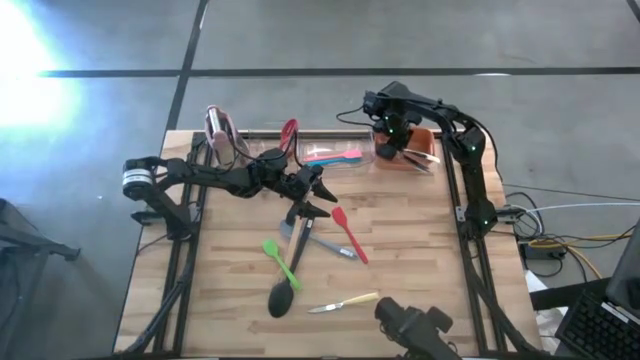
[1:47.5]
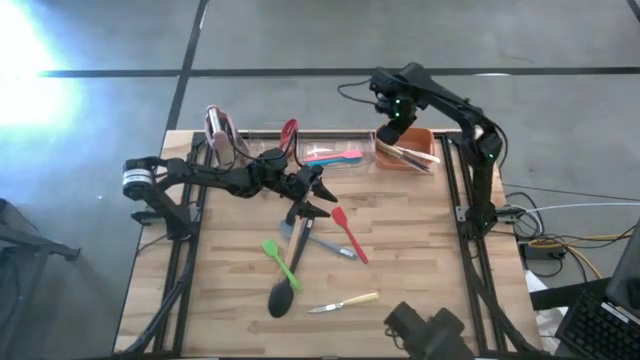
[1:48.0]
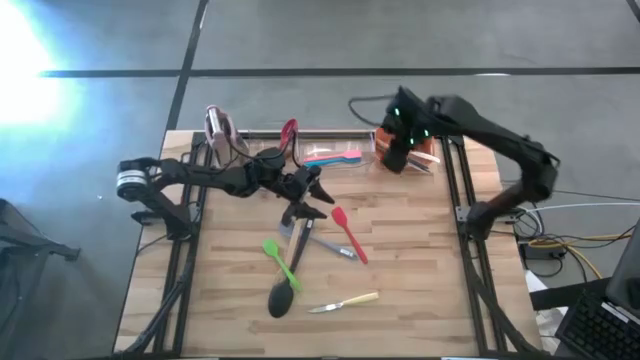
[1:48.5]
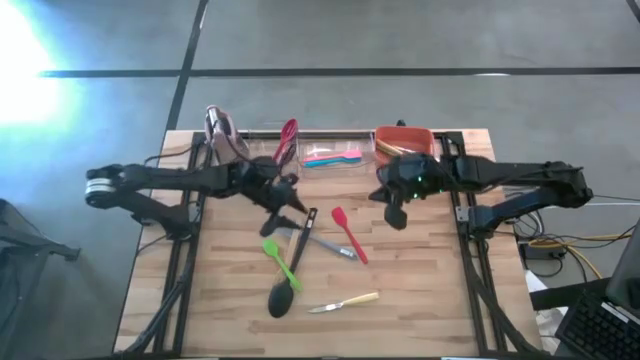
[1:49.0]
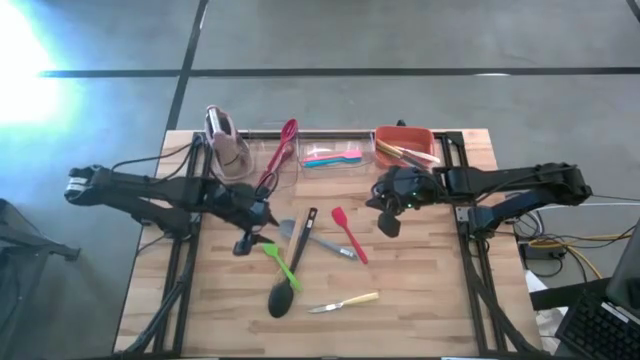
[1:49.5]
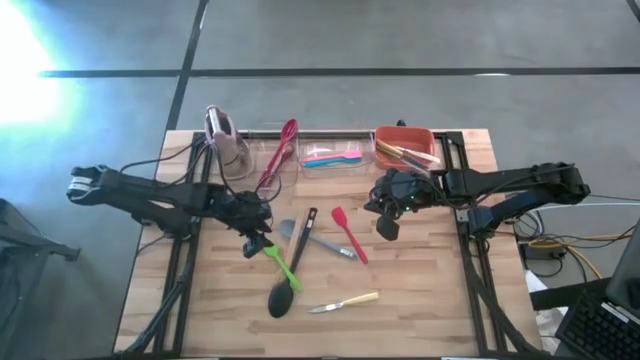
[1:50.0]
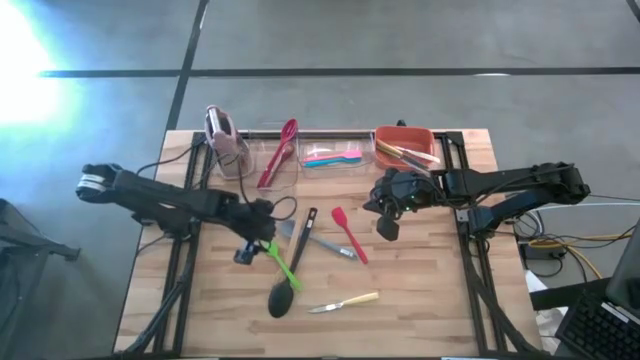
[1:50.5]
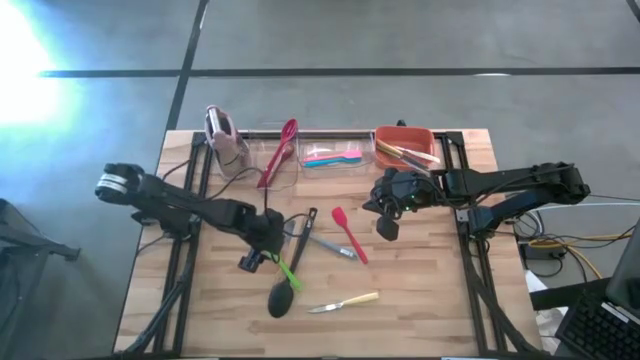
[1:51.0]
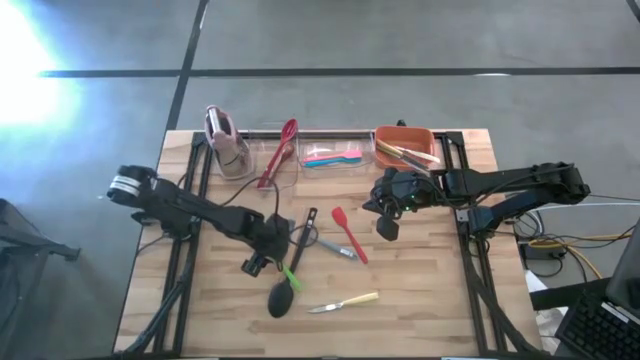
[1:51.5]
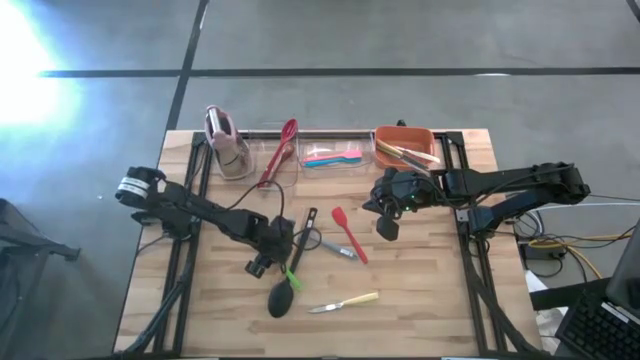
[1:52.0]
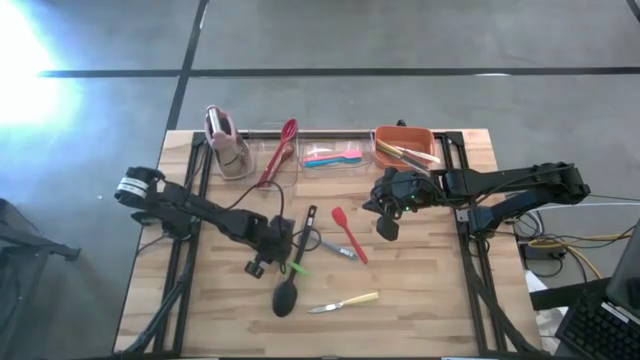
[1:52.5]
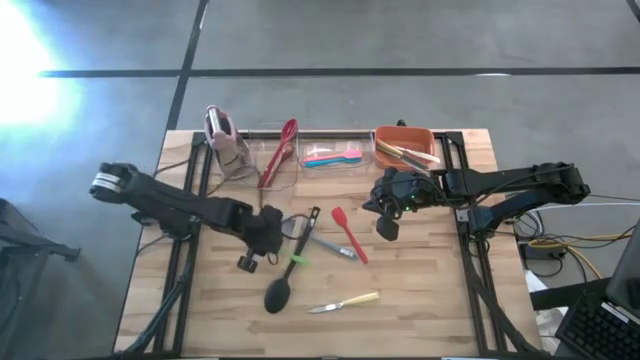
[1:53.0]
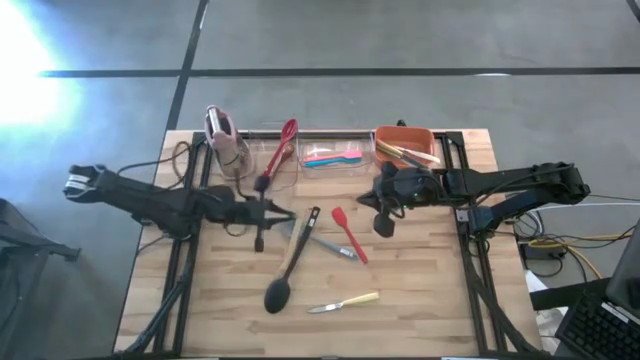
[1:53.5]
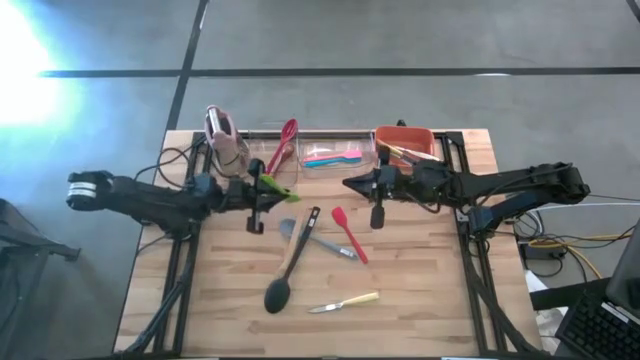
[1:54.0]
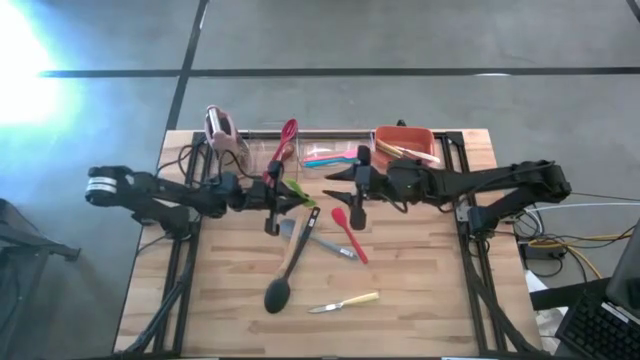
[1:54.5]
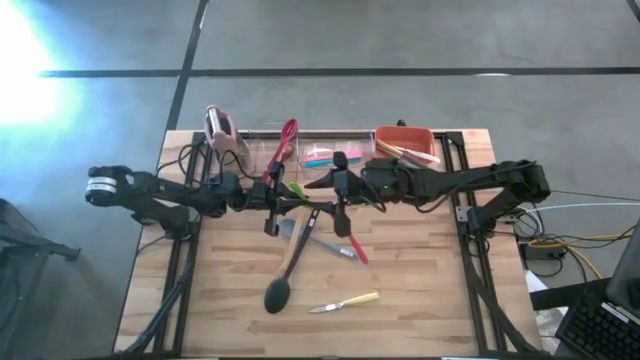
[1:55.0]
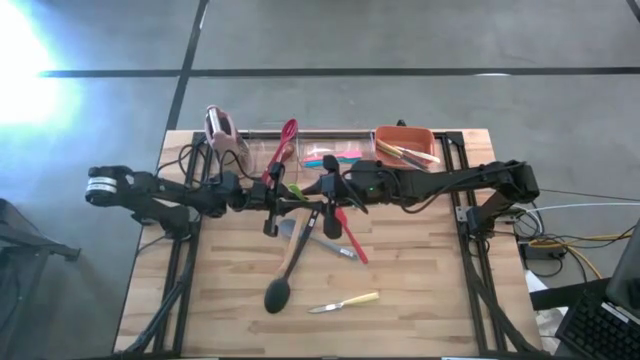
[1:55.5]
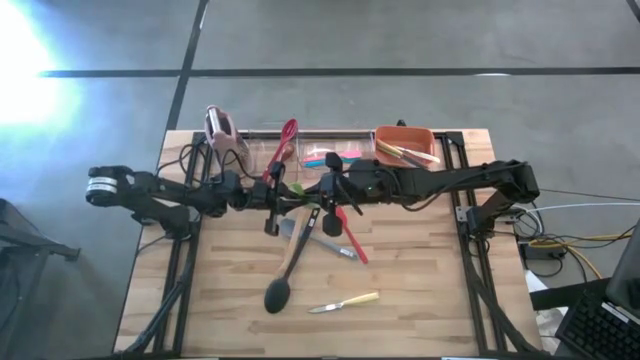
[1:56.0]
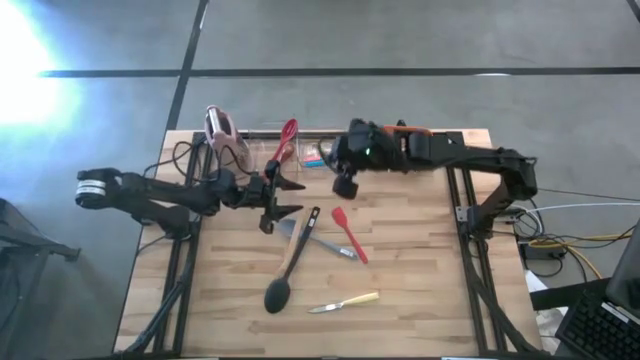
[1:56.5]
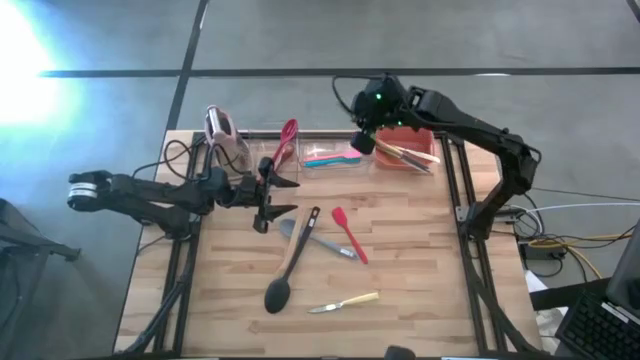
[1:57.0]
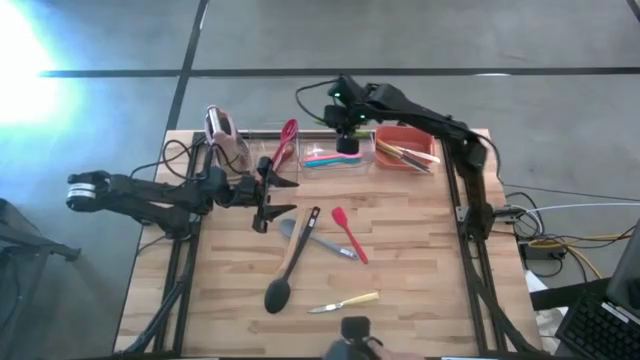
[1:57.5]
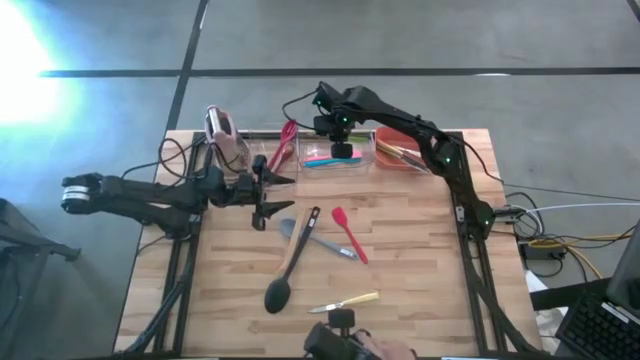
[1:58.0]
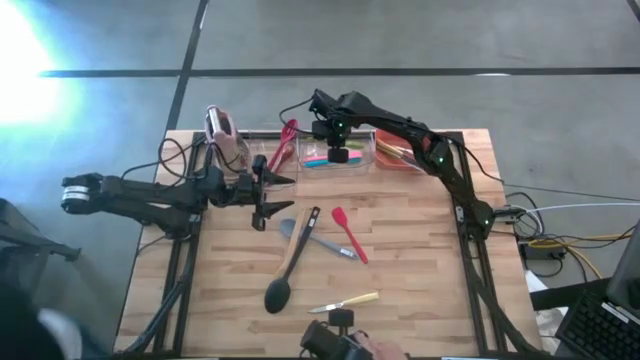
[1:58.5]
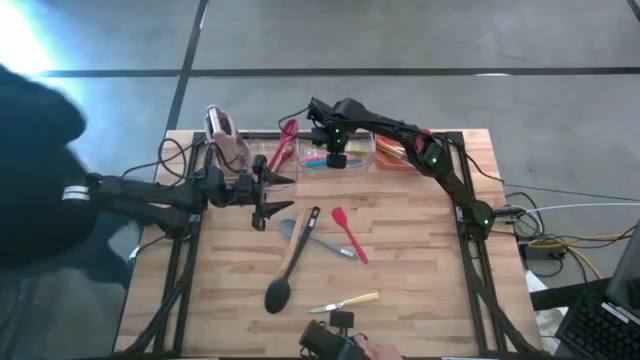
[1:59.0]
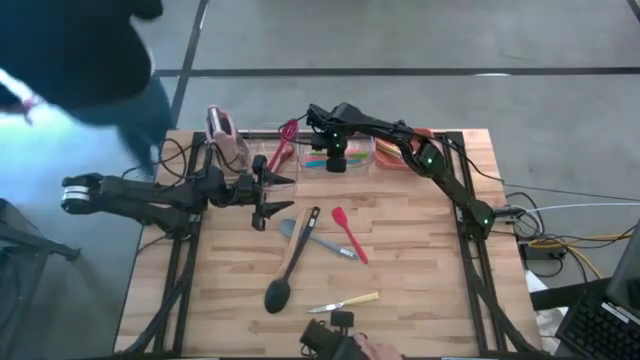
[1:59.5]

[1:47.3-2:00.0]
Task: Pick & Place Kitchen Items
Put the green spatula into the right transparent bin

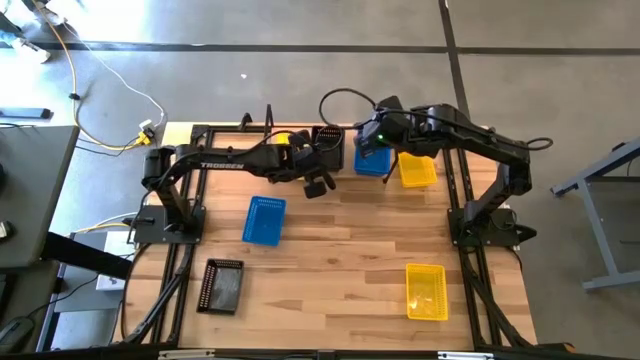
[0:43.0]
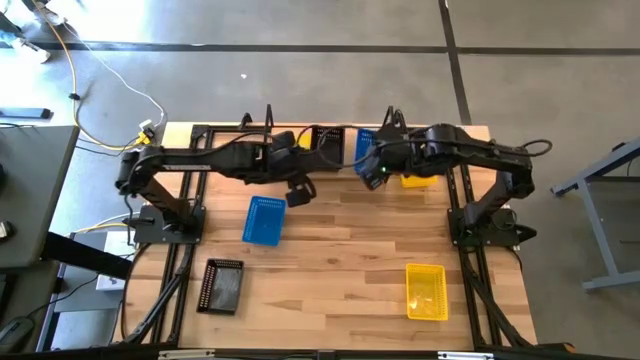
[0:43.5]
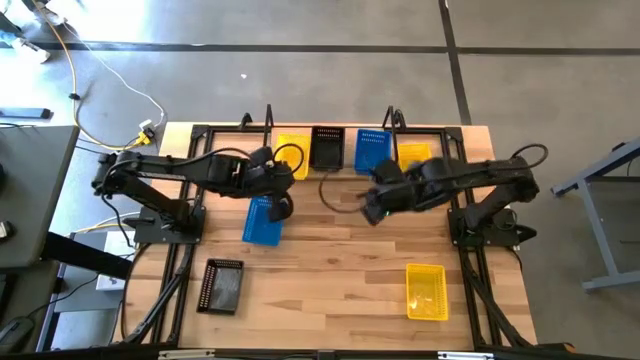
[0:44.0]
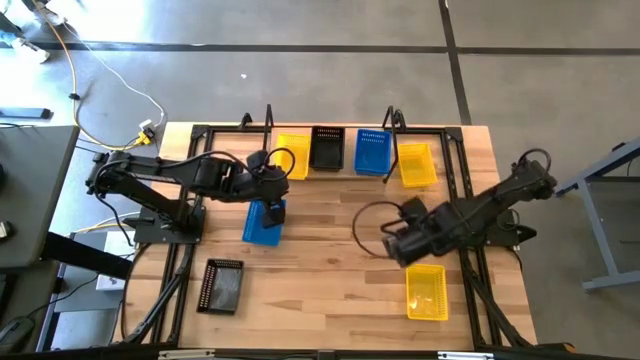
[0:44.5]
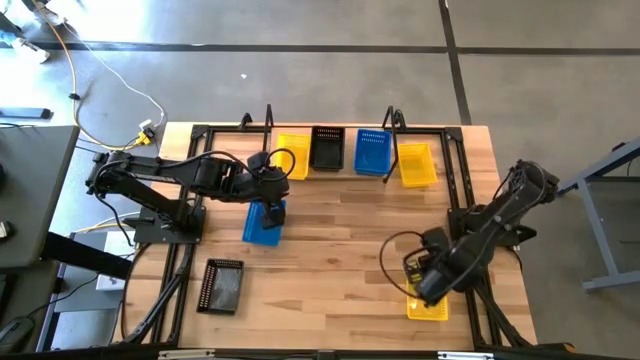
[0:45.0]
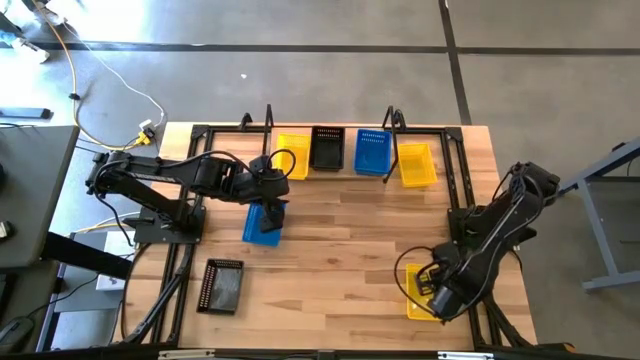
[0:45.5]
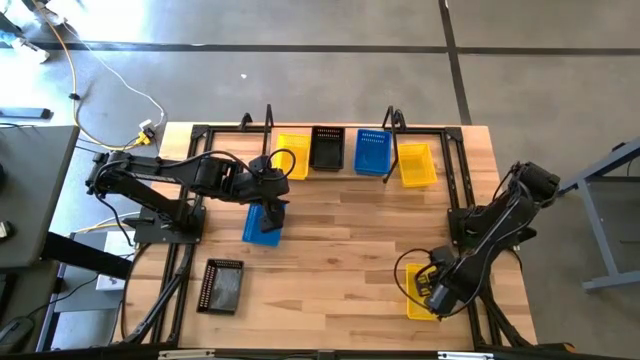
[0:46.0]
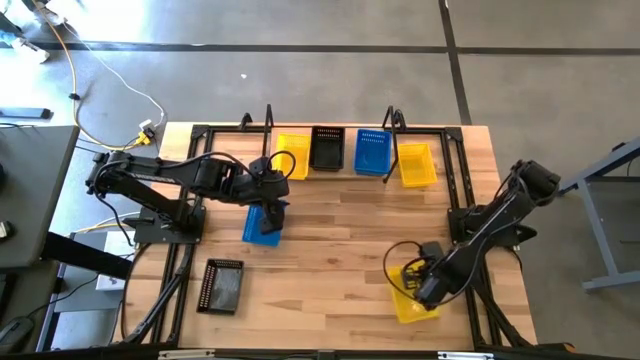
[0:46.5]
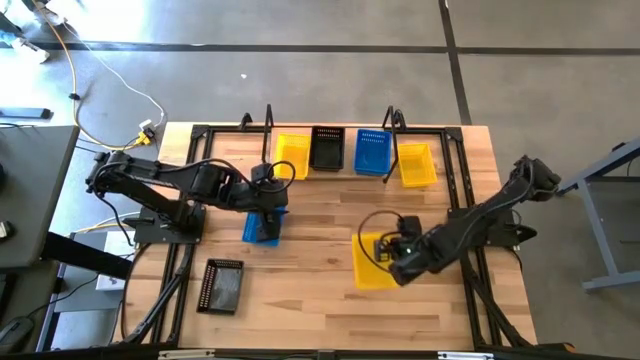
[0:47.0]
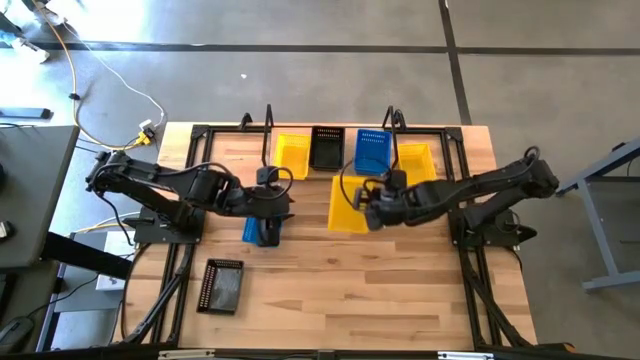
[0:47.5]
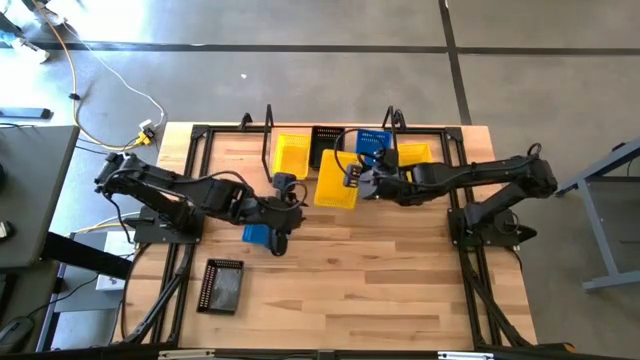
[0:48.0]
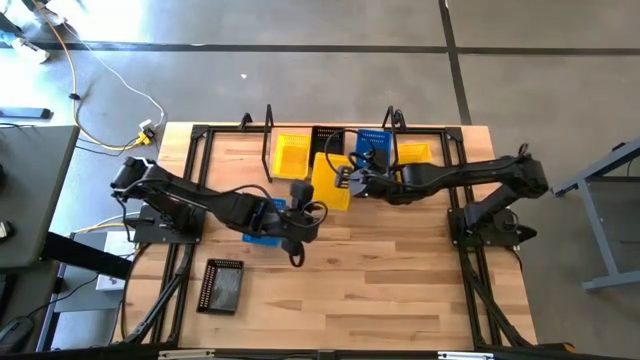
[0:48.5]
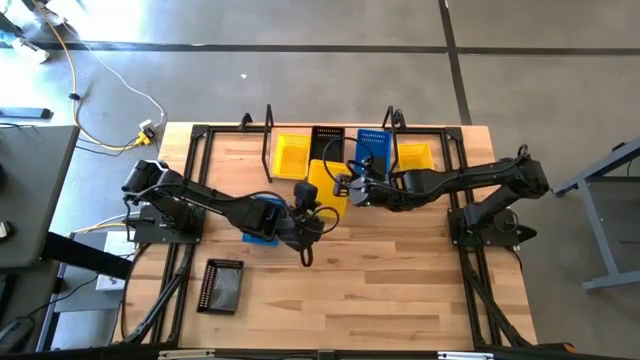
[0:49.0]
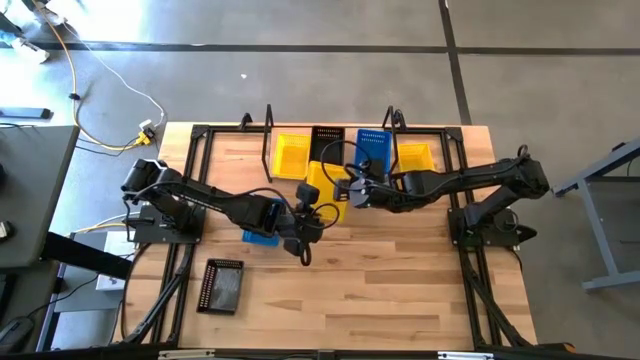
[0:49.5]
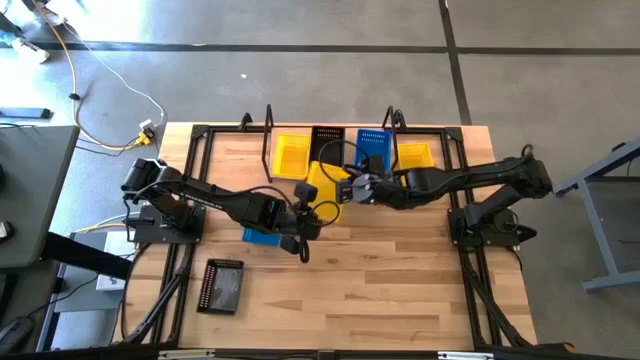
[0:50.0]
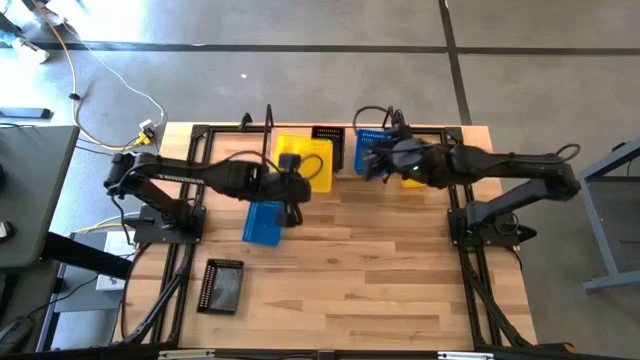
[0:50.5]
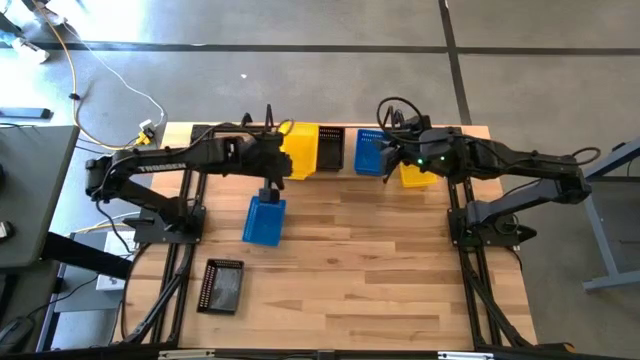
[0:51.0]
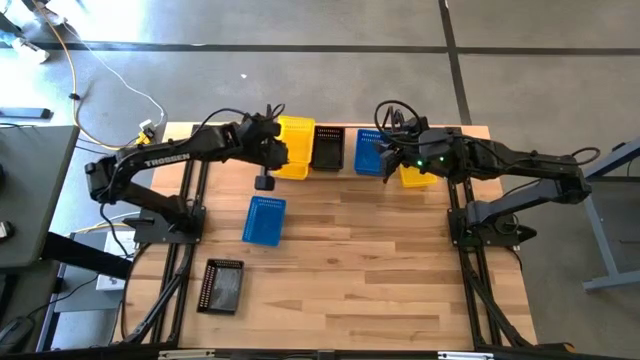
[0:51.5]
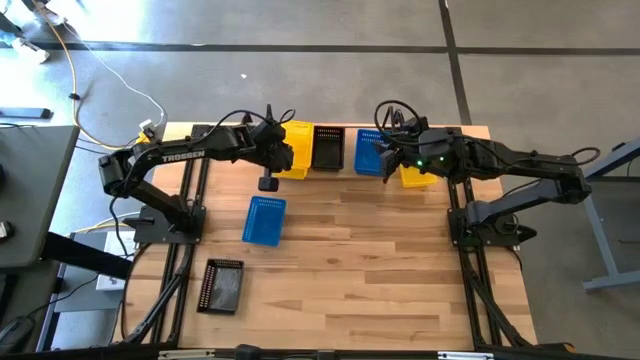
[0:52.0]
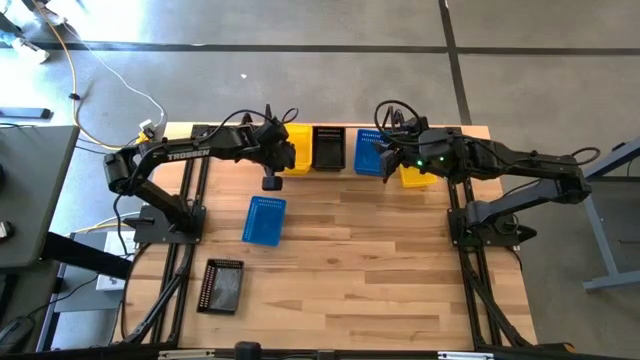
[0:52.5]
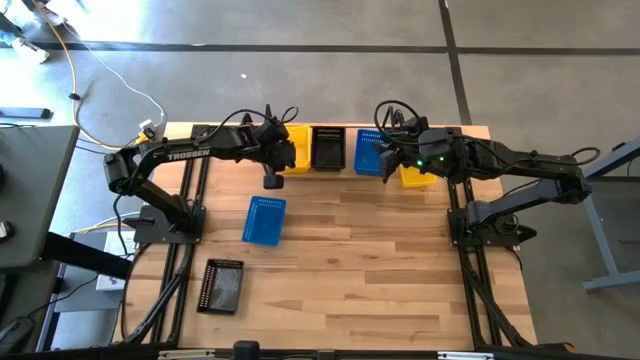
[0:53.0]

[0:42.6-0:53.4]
Task: Stack baskets on shelf by color
Stack the bottom yellow bin on top of the other yellow bin on the shelf
